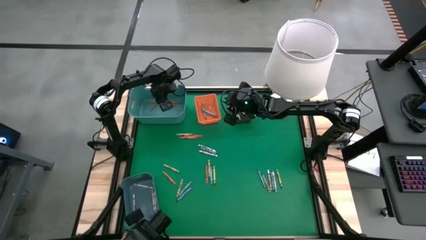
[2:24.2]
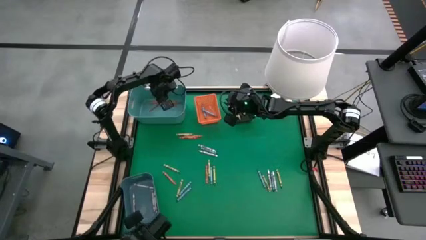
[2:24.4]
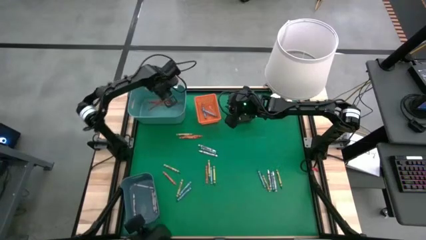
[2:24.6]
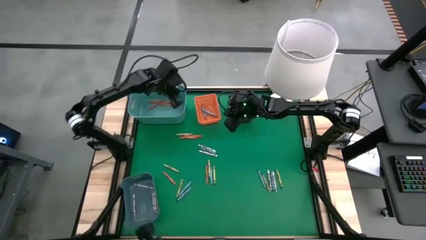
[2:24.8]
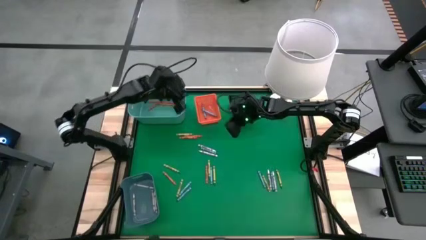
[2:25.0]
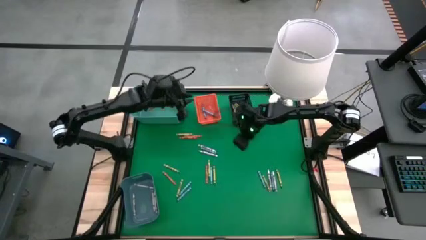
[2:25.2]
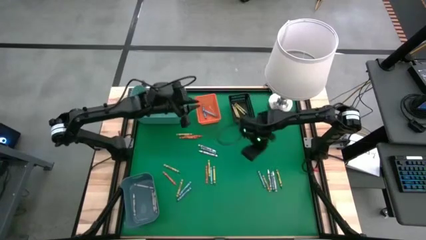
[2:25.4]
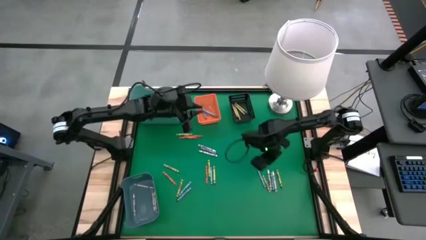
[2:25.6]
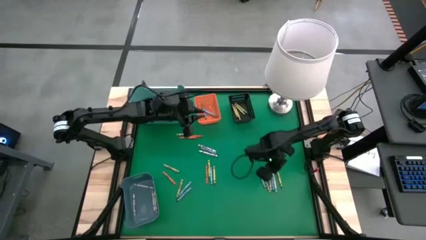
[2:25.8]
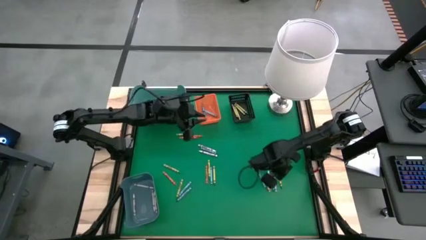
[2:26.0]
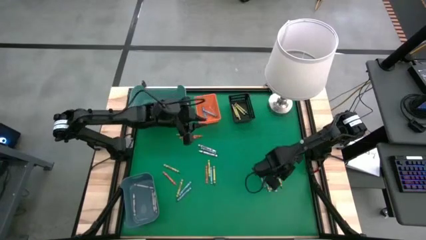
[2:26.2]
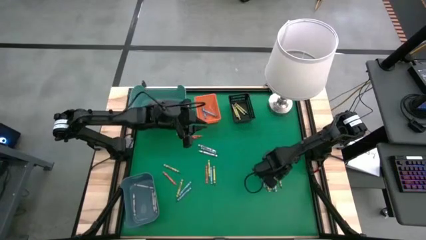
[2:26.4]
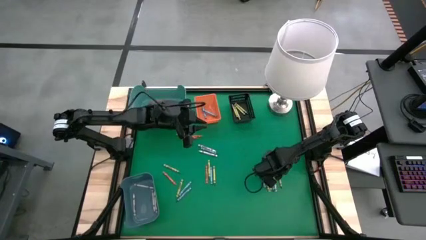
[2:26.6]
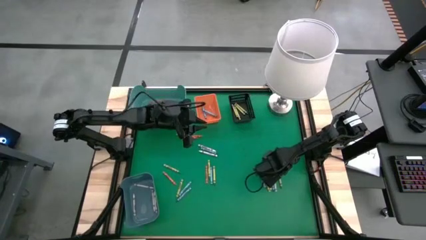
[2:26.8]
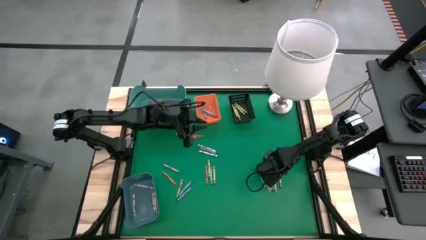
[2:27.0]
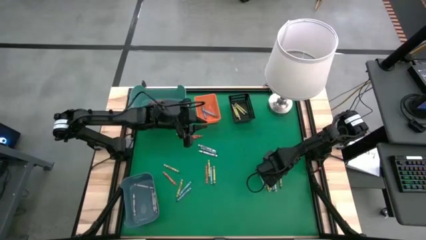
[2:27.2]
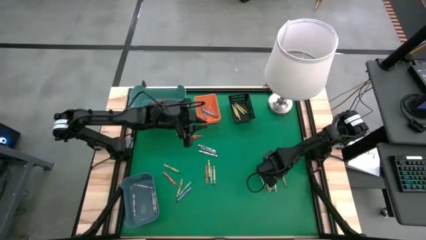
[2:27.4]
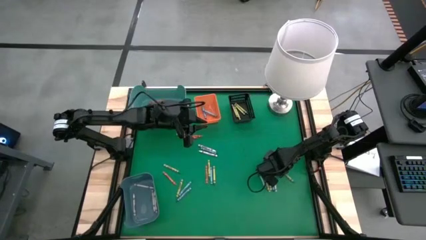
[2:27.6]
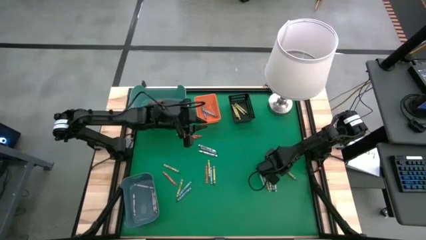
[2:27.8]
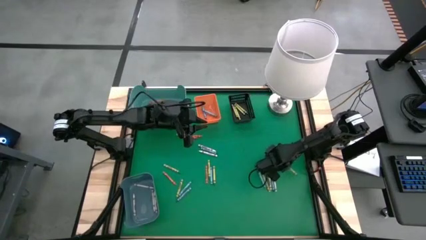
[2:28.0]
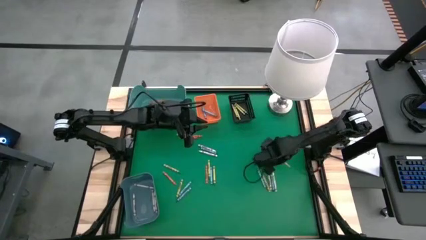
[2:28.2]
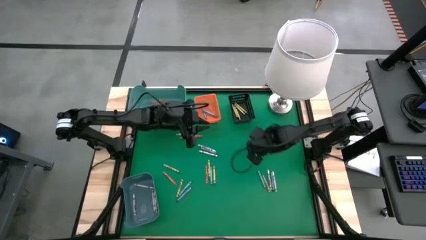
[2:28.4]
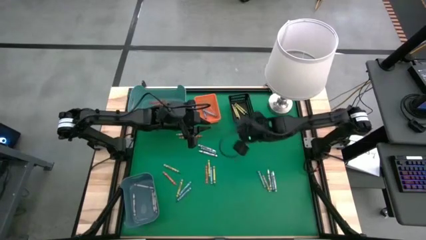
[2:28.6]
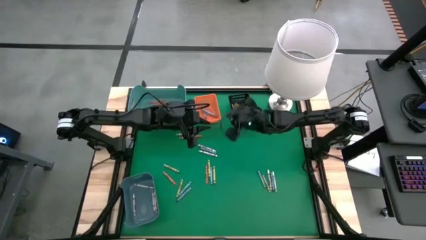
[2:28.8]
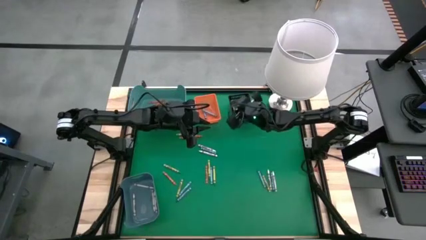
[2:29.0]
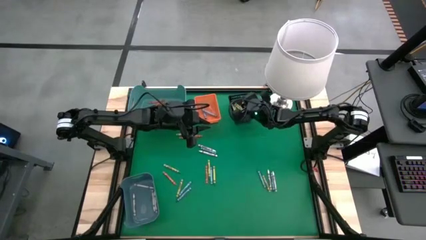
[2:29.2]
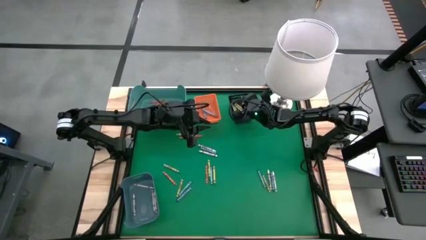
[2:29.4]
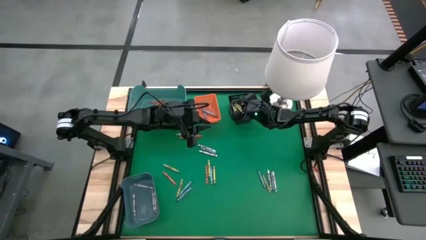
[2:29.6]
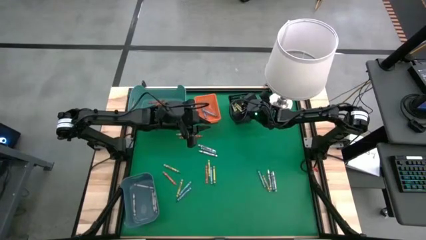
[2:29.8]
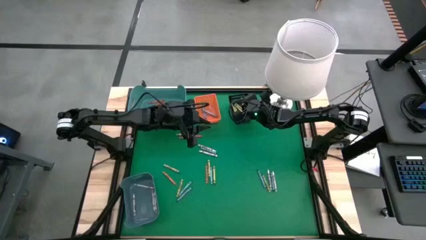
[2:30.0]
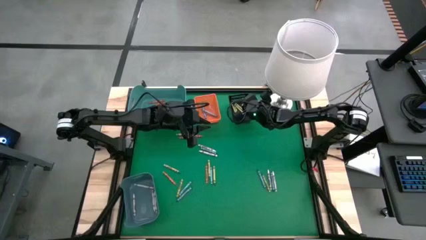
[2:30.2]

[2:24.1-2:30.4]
Task: Sort crayons
Put the green crayon into the black bin

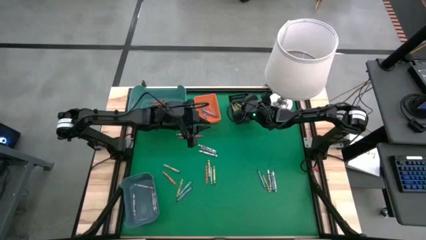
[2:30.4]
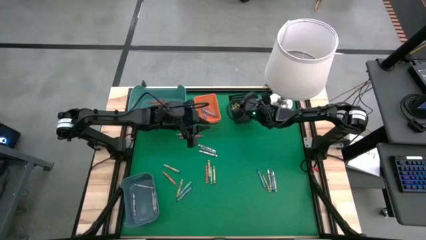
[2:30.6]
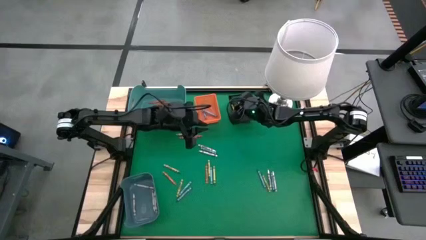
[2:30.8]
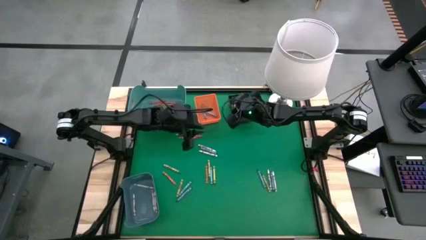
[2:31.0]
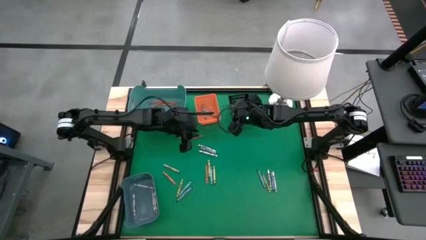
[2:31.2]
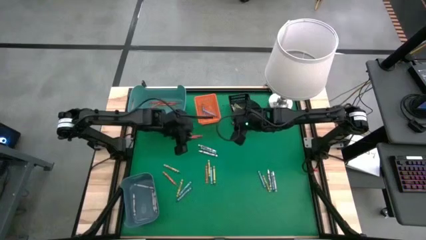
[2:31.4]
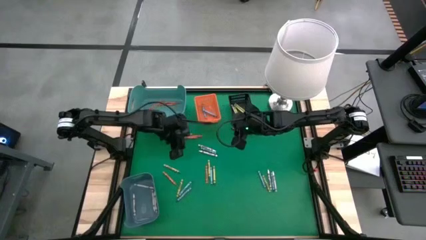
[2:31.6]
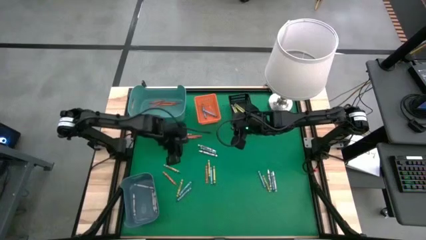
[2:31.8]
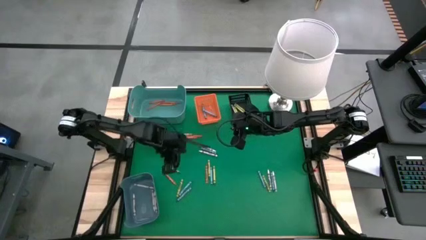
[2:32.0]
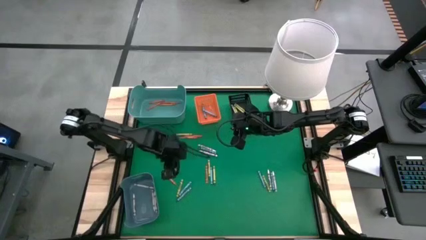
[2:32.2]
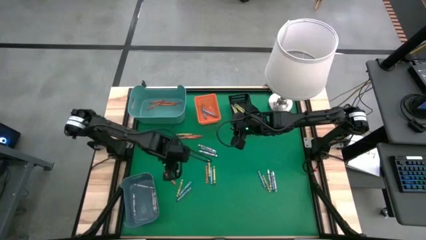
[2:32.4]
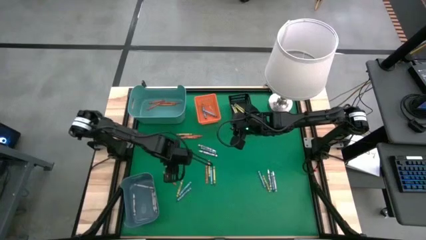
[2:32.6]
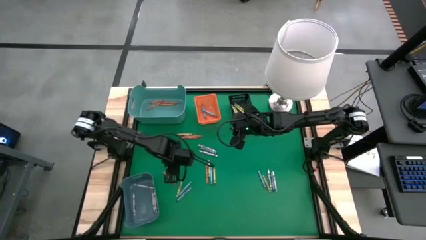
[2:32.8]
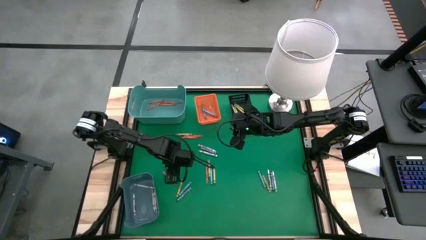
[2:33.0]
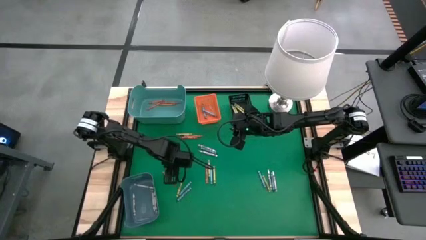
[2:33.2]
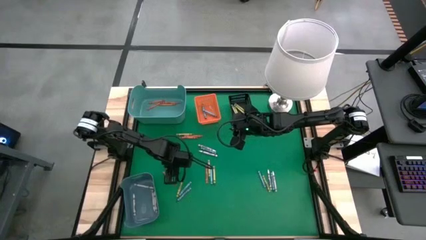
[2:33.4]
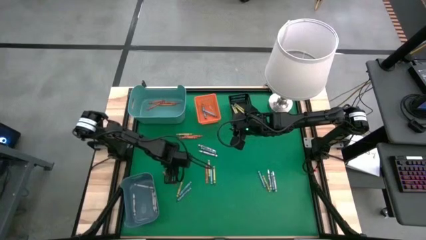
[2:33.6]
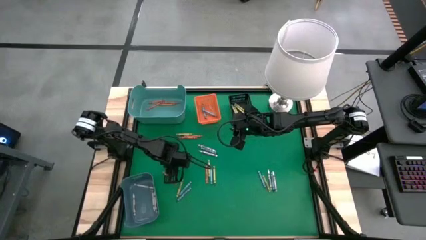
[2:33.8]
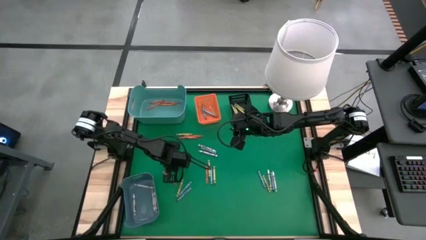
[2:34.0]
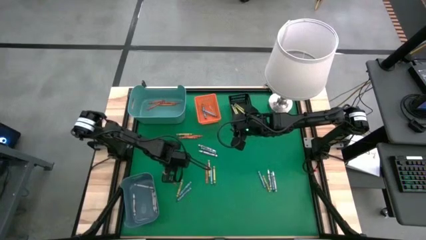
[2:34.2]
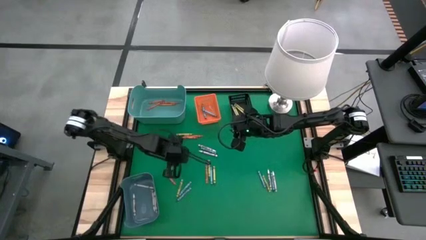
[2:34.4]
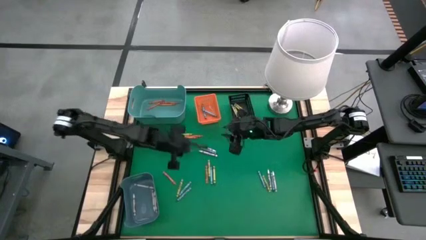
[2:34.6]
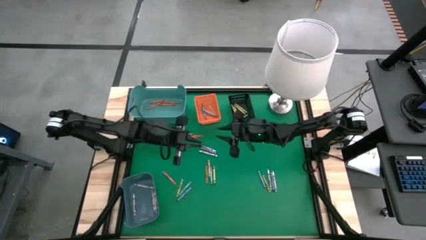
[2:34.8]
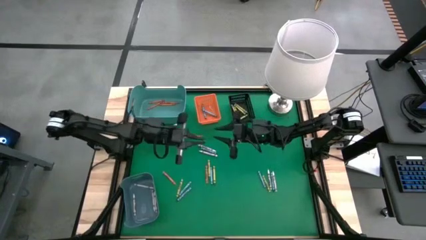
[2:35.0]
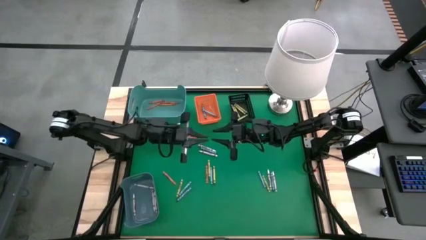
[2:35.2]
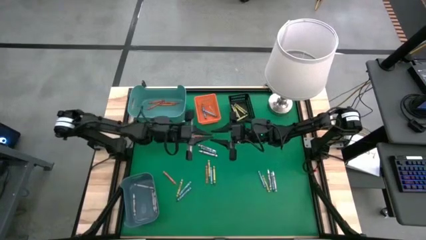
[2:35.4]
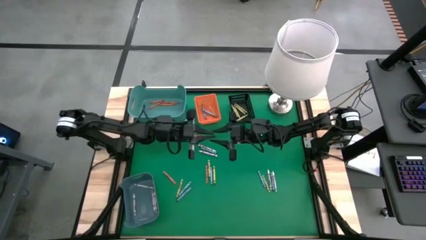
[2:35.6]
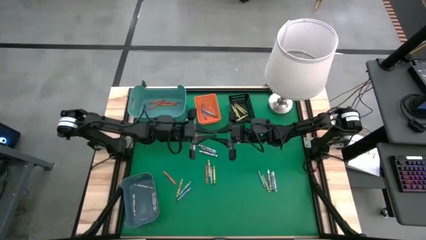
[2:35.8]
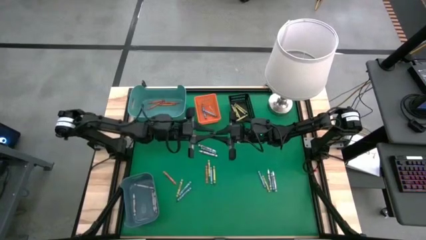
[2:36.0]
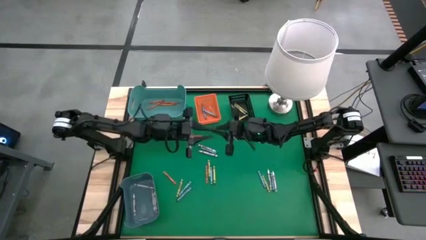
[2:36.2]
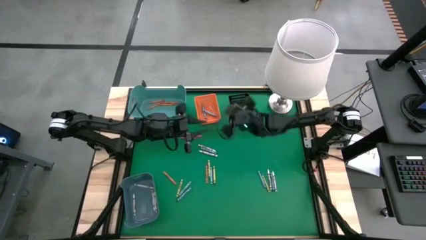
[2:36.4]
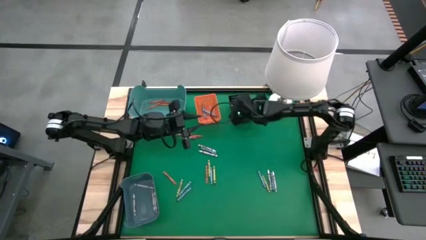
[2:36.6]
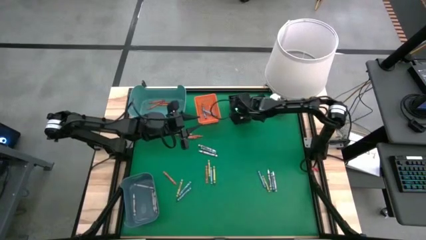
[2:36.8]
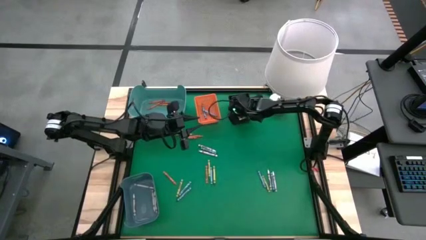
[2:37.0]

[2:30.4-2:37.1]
Put the green crayon into the black bin

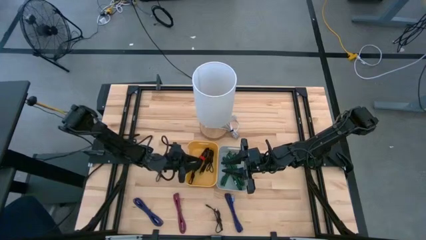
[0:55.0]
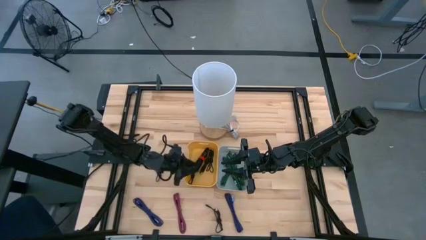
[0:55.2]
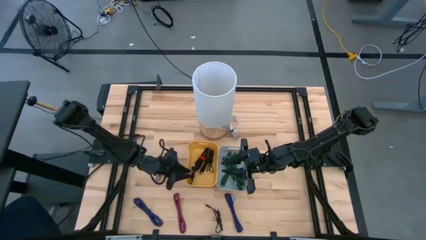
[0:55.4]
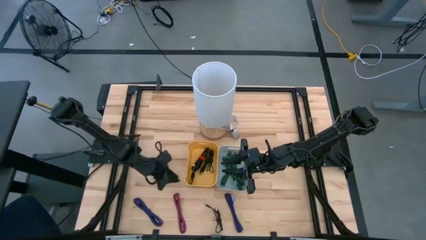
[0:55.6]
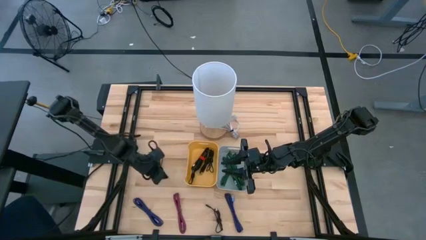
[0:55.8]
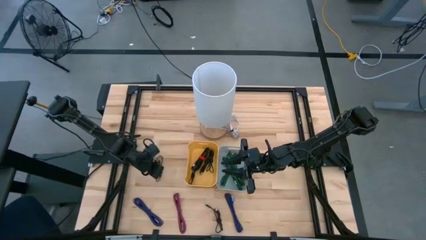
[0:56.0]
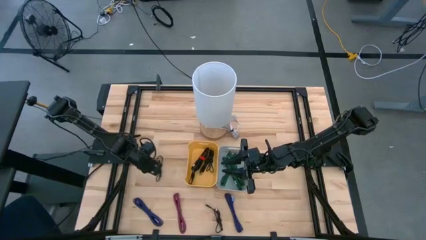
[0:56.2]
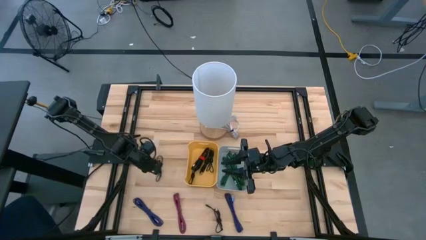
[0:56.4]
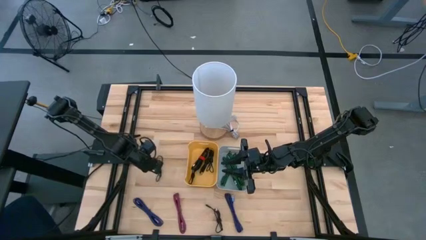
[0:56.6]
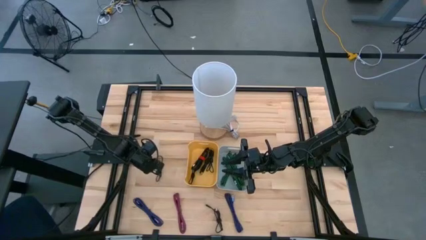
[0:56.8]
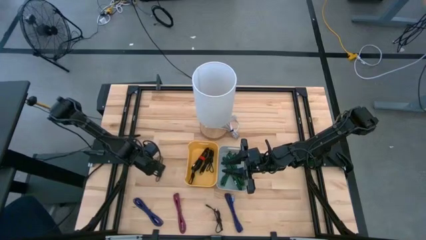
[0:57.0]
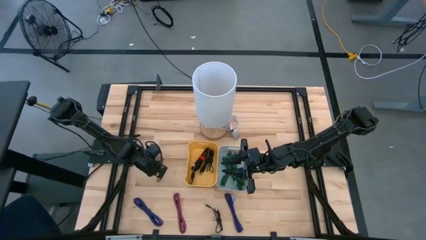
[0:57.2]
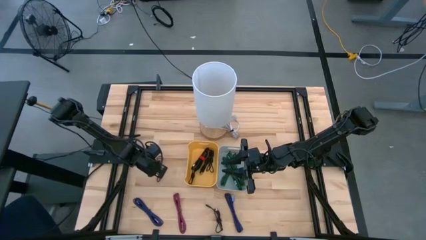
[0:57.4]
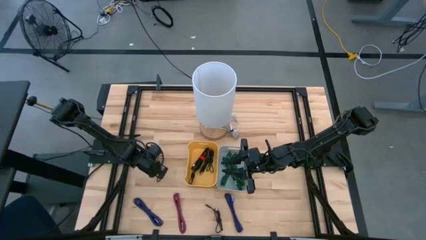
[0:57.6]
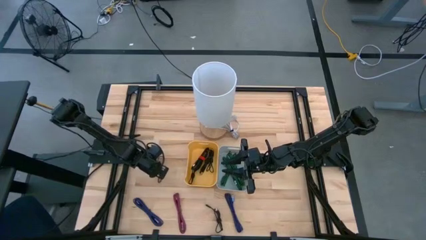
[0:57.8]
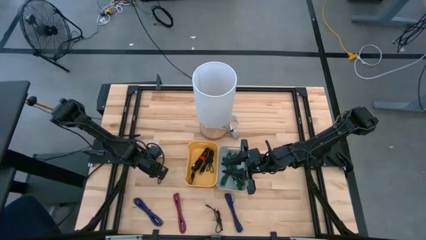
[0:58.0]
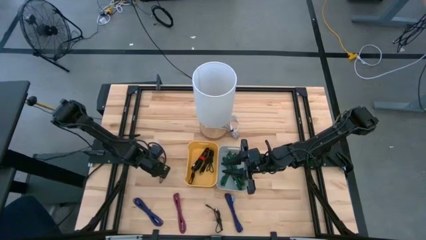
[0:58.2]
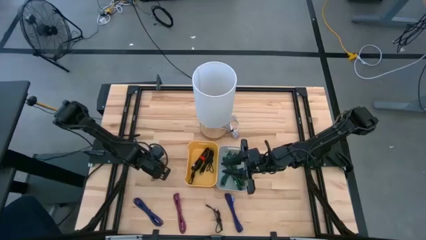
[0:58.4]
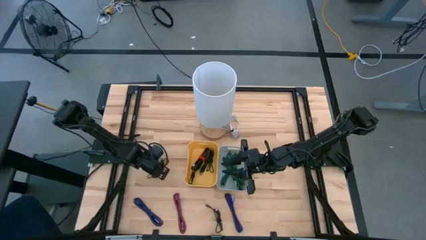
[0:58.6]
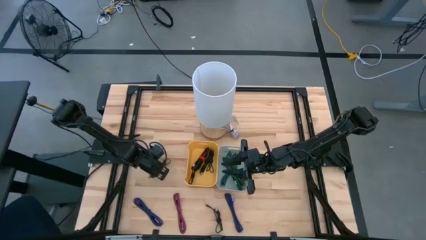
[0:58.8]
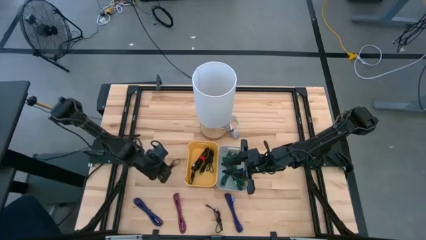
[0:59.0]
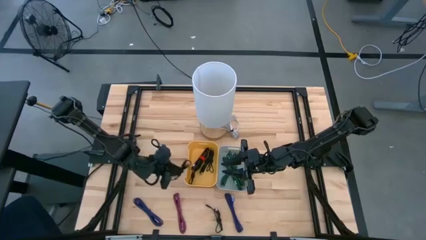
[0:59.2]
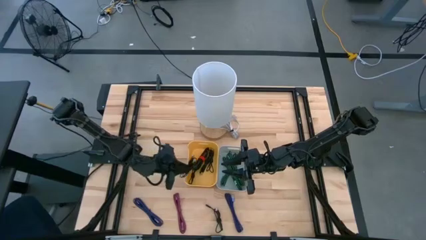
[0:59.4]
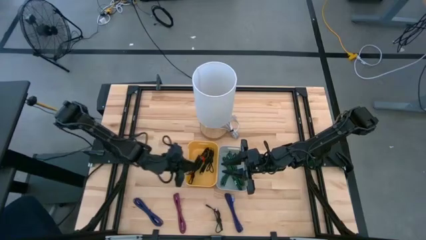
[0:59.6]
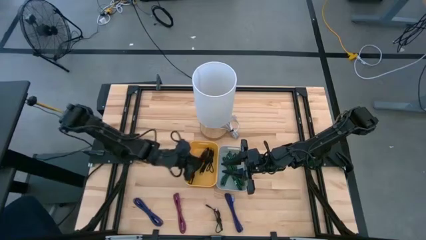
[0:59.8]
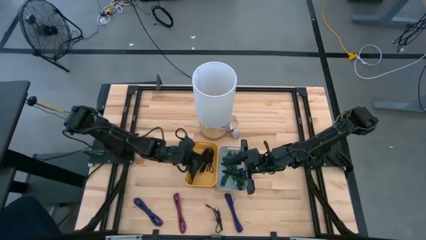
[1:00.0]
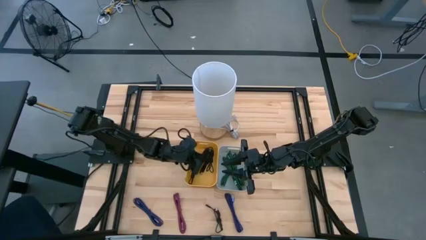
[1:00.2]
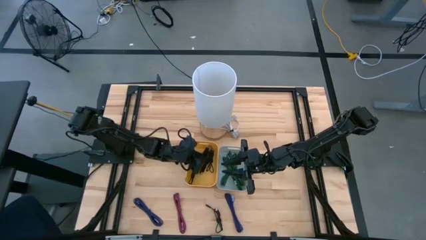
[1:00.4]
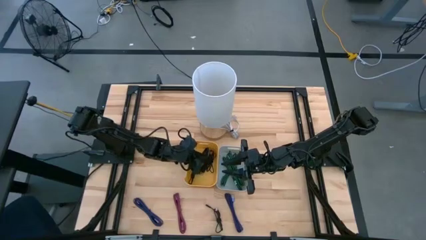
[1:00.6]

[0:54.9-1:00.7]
Task: Pick & Place USB Port
Put the black charger cable into the yellow bin
